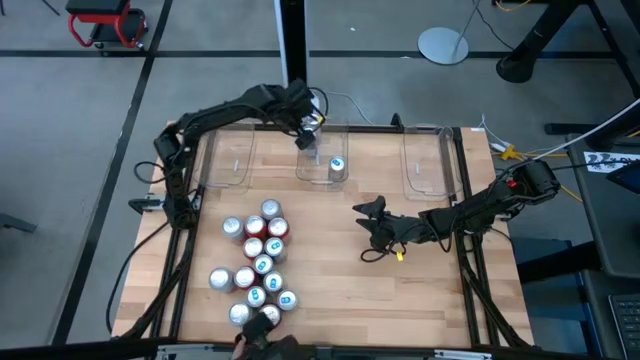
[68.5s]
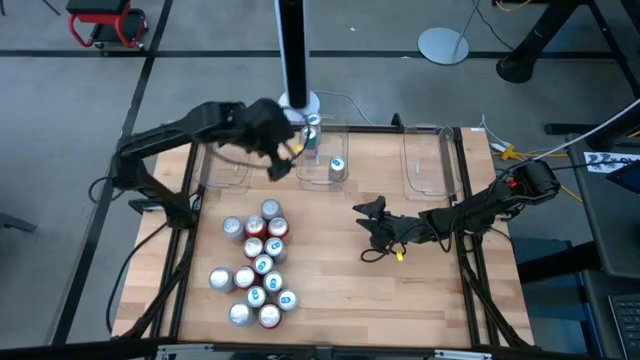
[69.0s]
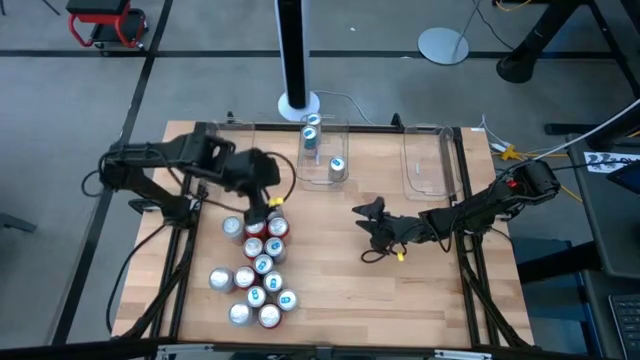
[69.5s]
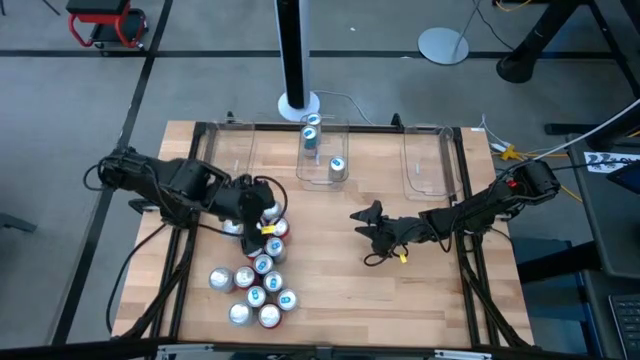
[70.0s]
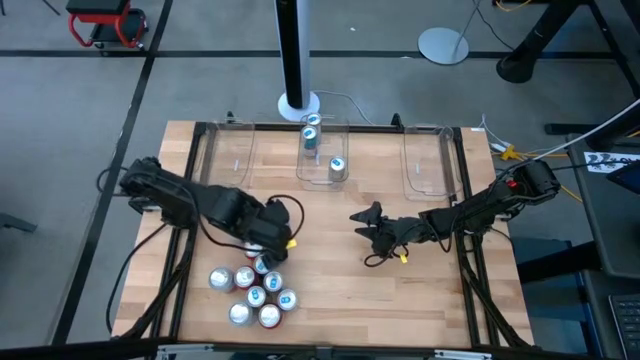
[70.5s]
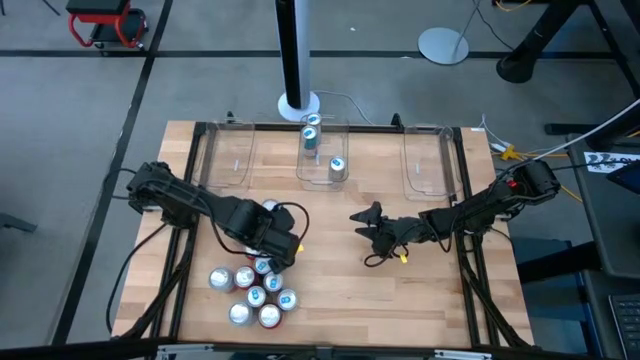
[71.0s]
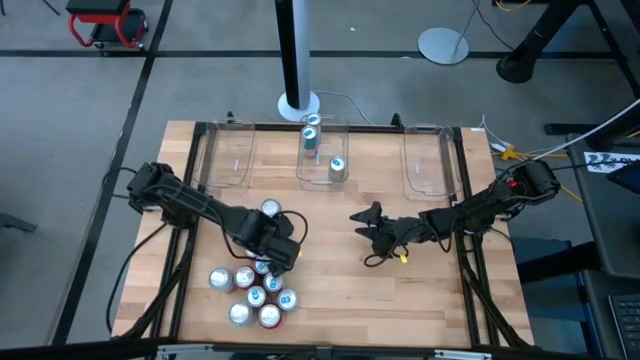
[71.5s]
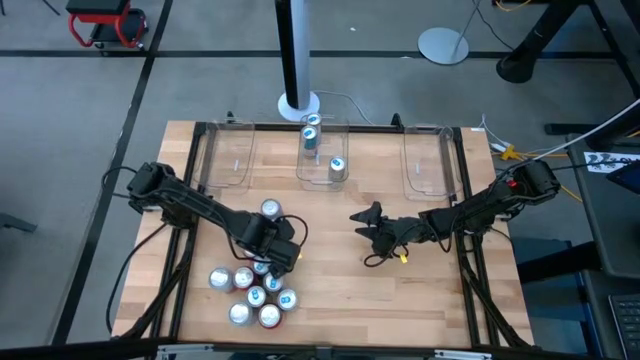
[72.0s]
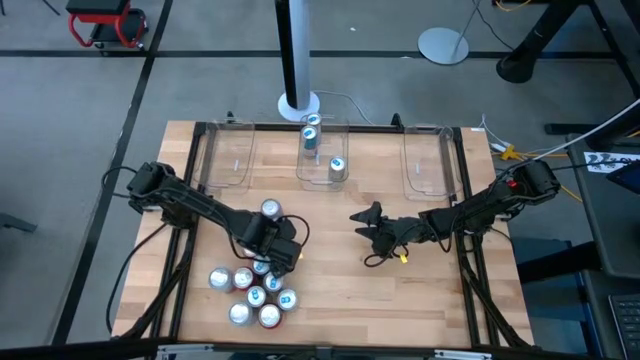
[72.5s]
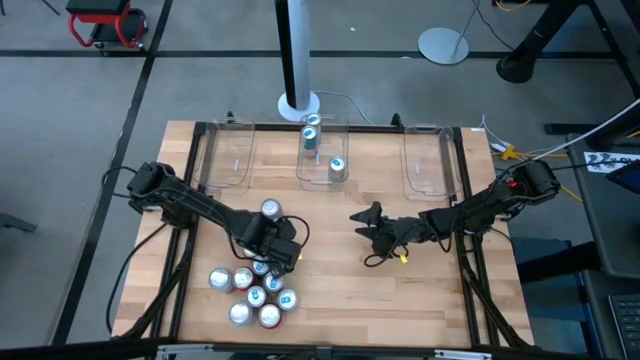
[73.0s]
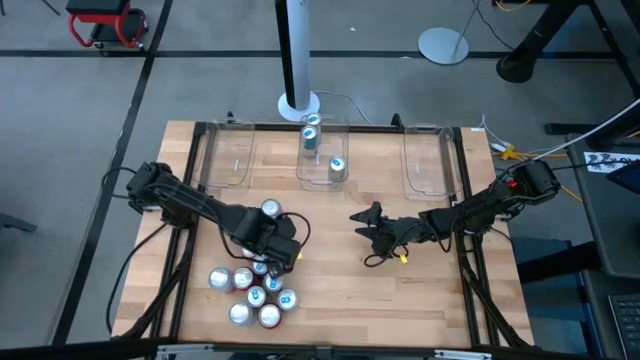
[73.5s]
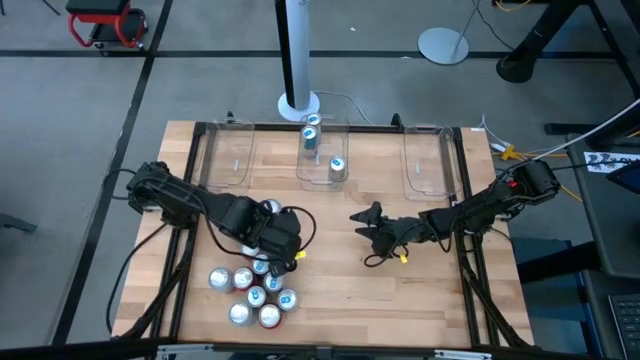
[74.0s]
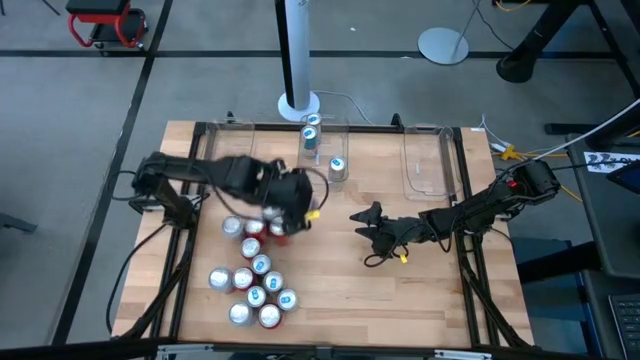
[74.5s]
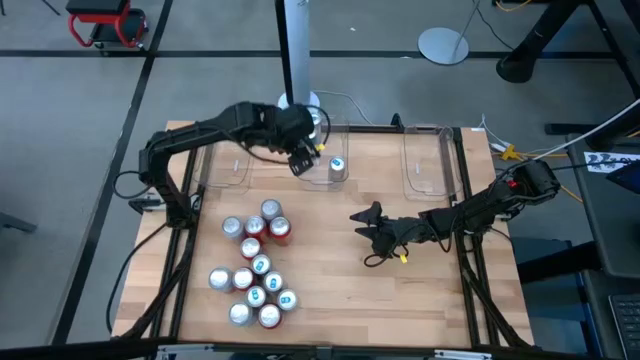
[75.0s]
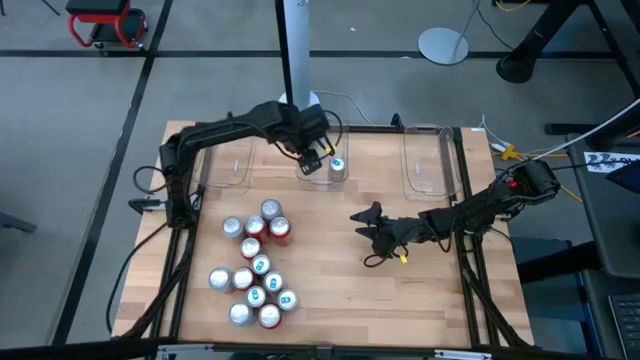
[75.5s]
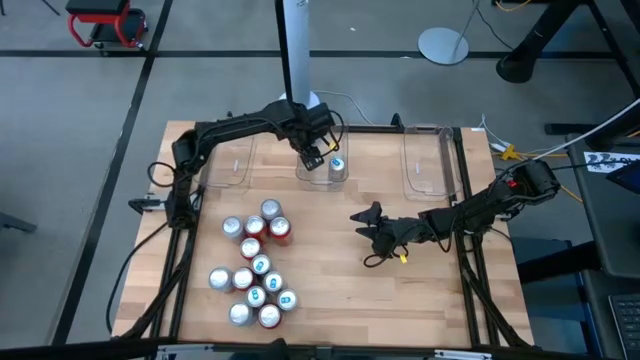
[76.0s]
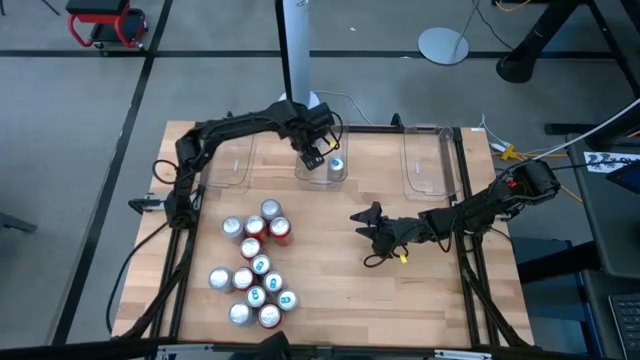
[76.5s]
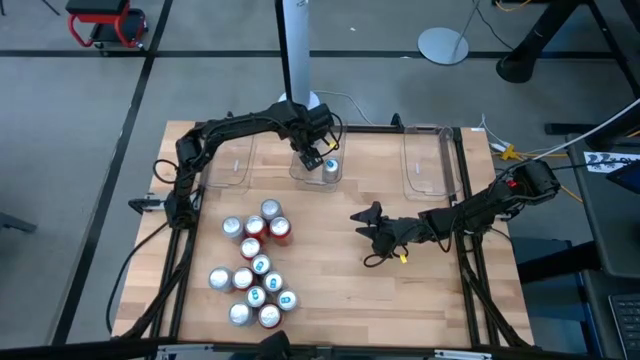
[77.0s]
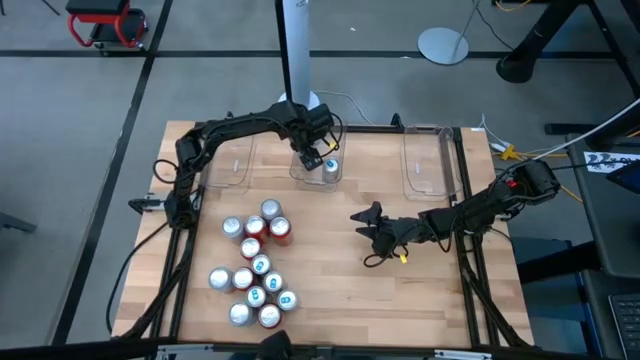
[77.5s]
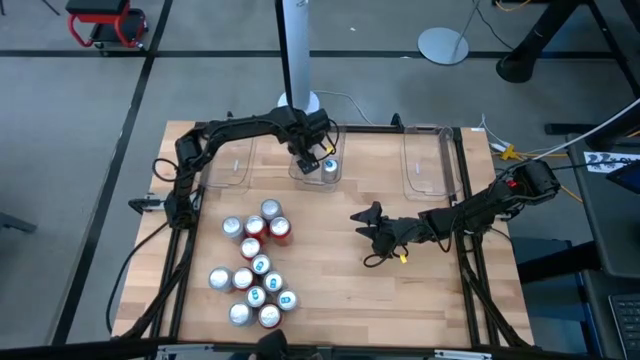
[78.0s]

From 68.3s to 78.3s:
Task: Sort soda cans
Put the blue soda can into the middle transparent bin

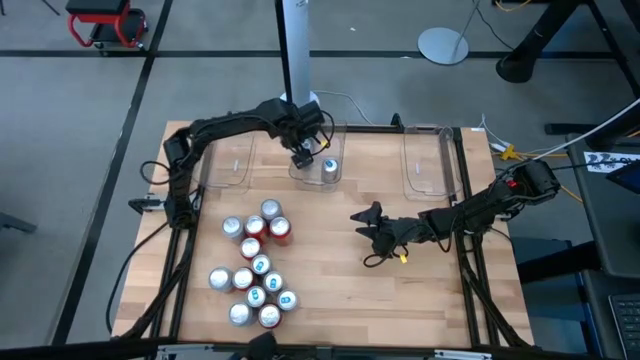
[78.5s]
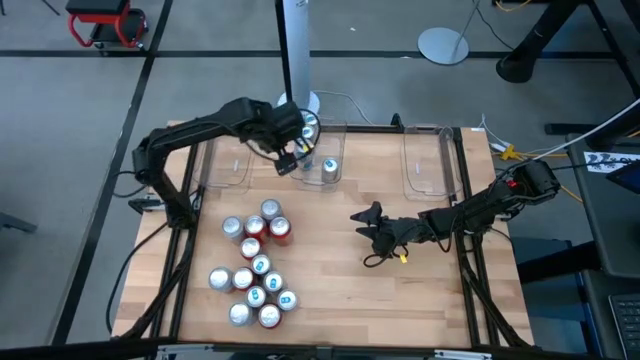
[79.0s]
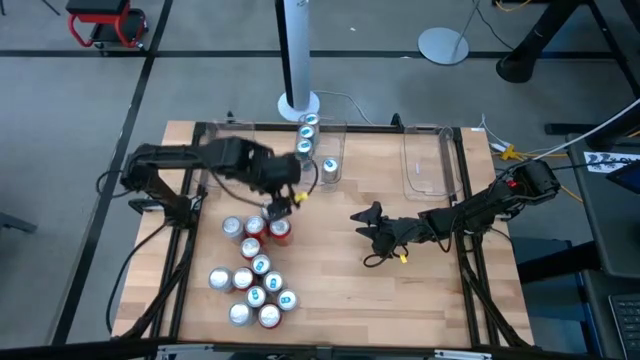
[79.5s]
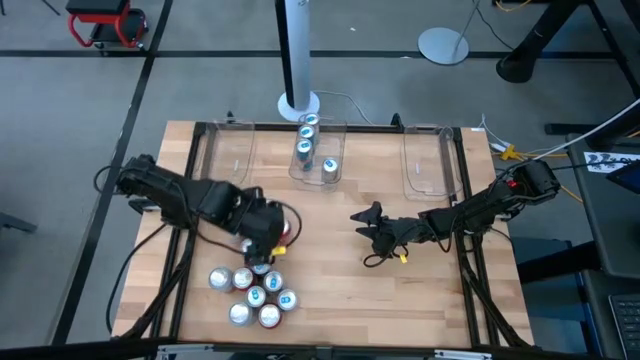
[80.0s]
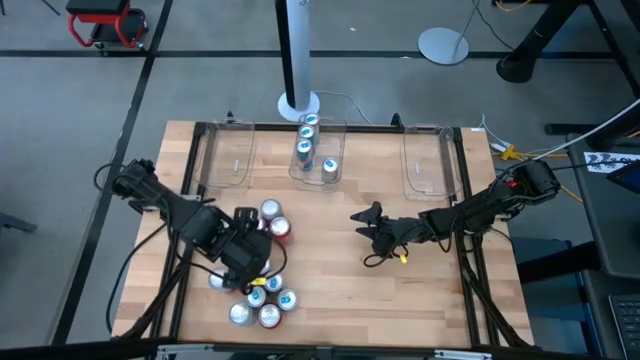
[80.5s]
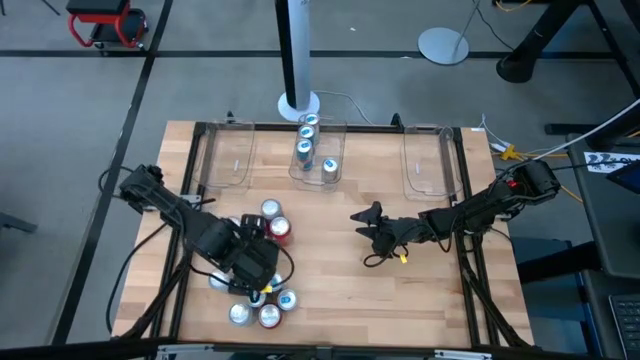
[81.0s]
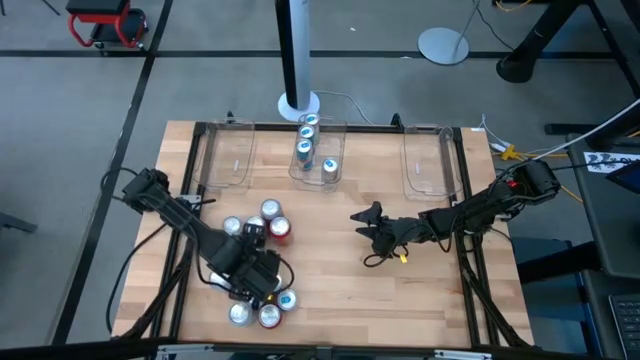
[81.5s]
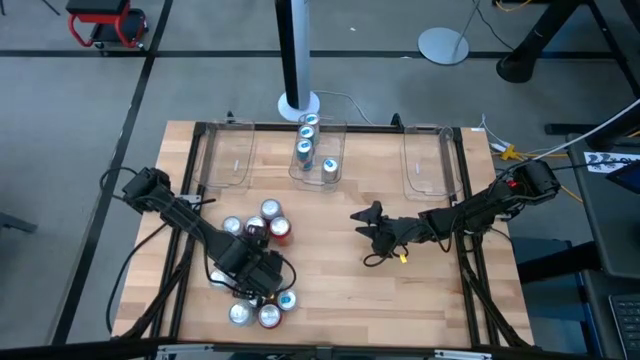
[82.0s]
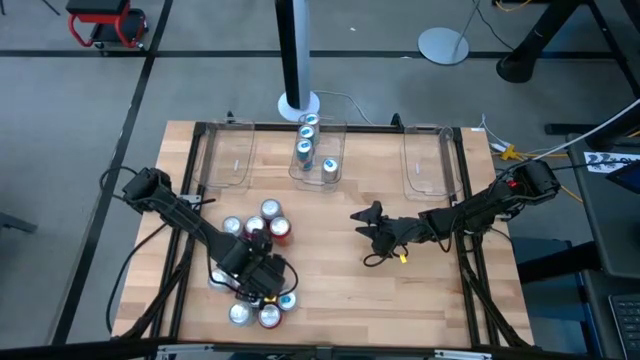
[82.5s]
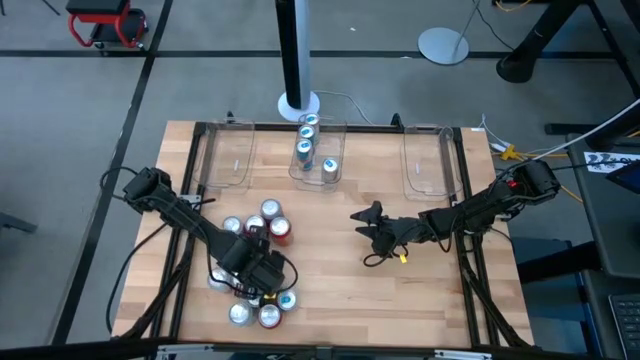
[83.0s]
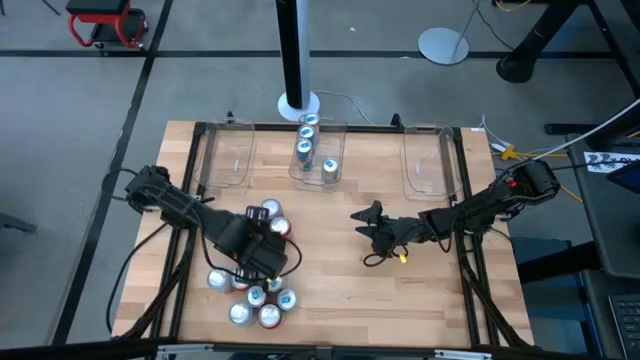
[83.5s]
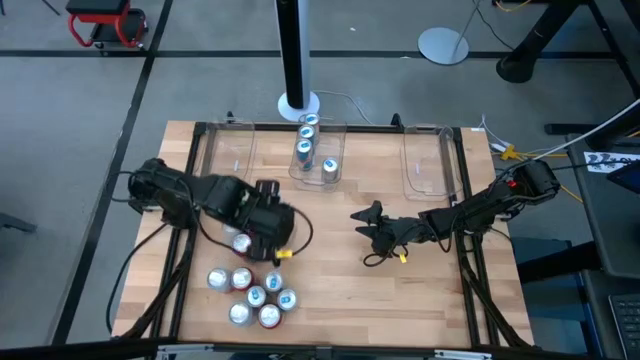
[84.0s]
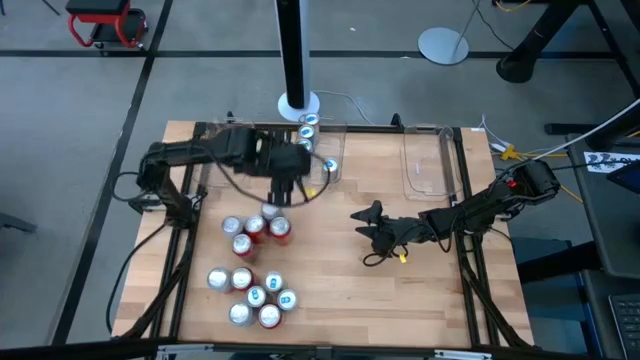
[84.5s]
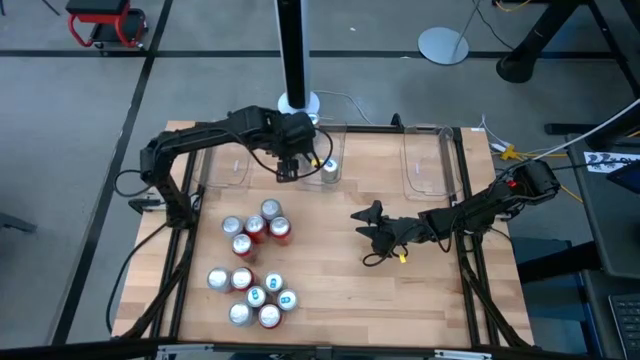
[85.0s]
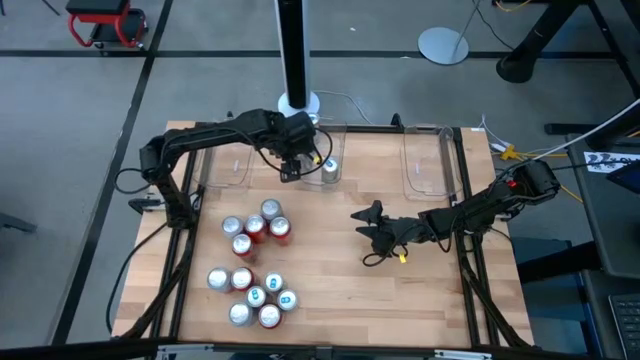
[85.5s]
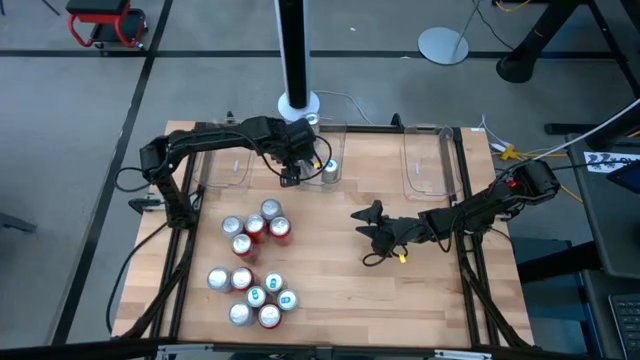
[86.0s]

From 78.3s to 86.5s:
Put the blue soda can into the middle transparent bin

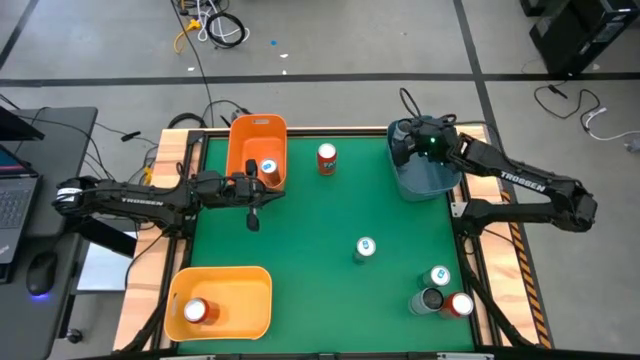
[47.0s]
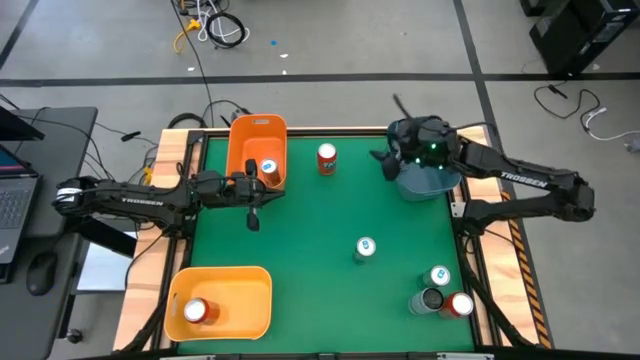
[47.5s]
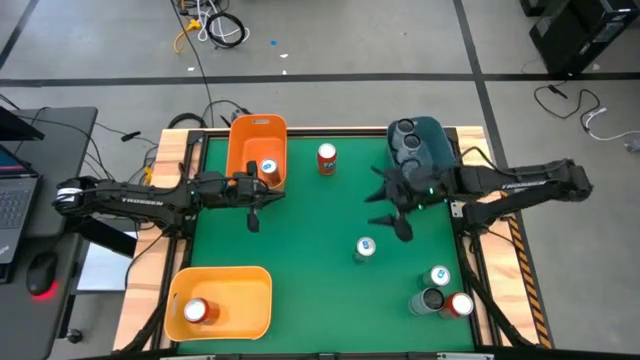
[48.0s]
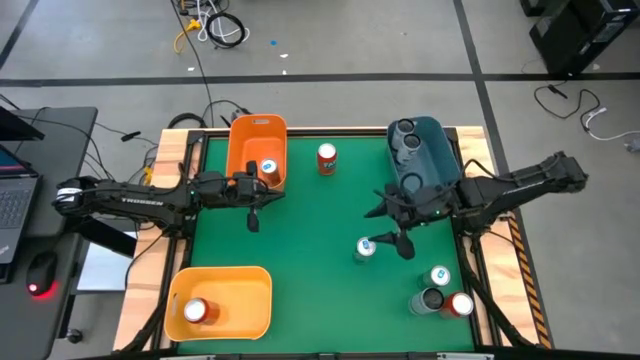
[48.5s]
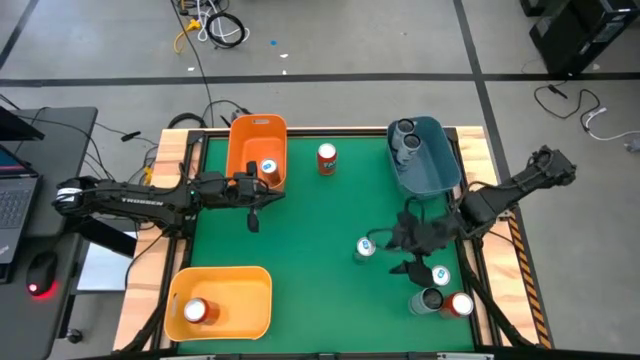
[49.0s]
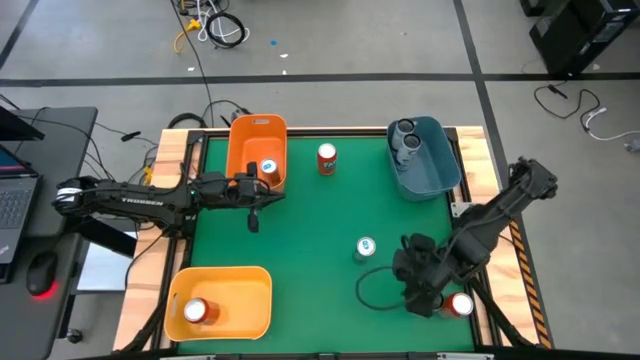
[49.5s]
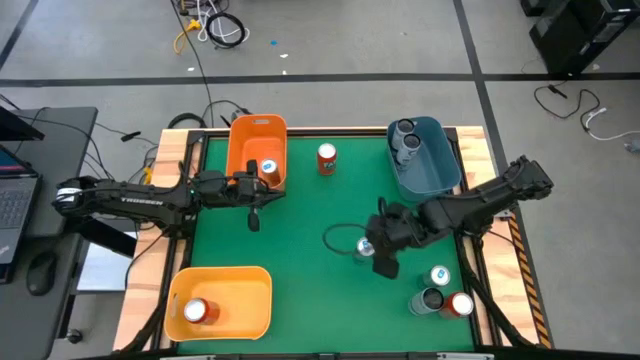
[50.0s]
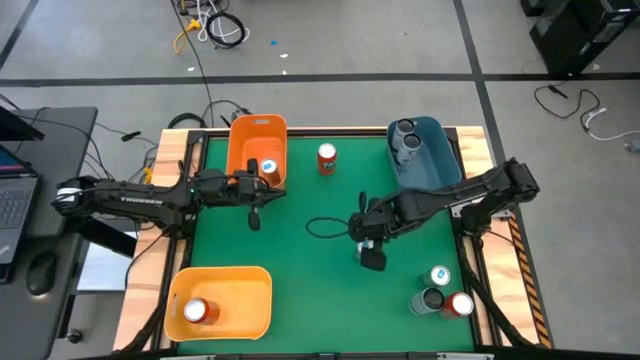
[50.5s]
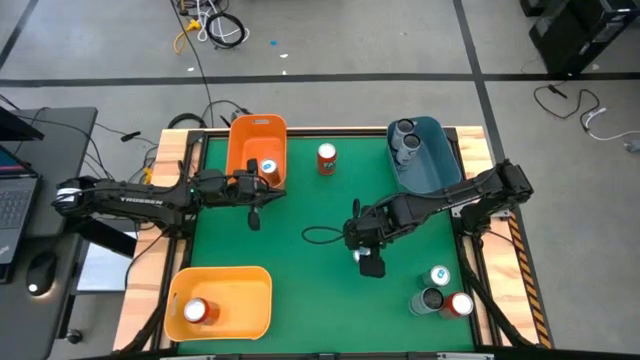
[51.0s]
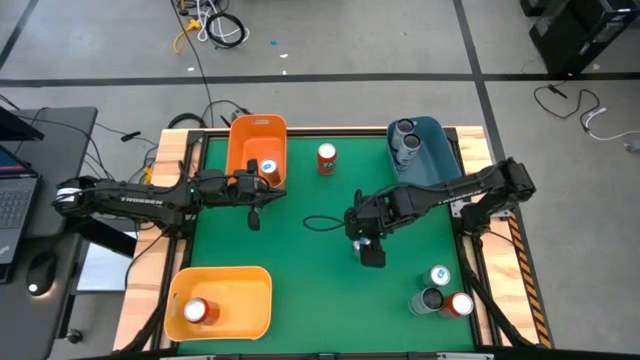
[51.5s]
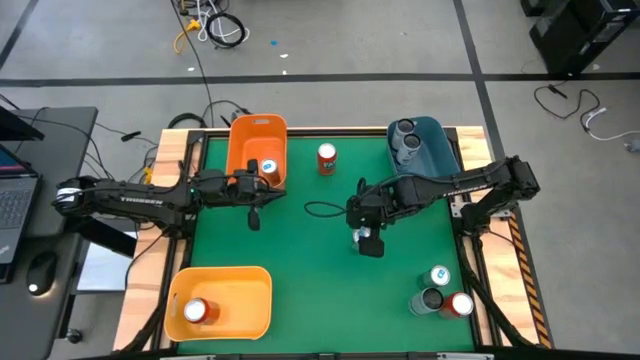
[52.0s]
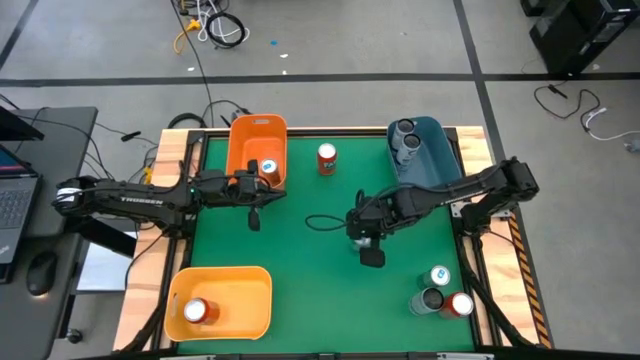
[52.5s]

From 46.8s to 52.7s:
Task: Sort soda cans
Put the left blue soda can into the orange bin
